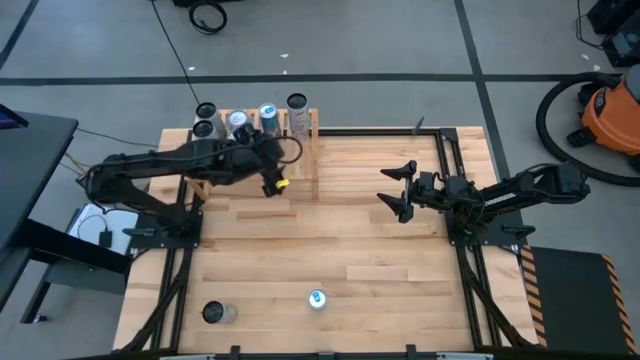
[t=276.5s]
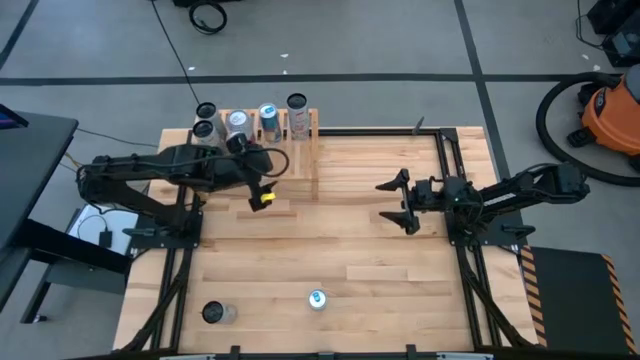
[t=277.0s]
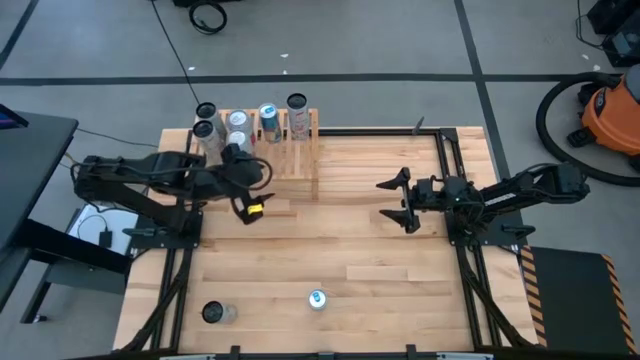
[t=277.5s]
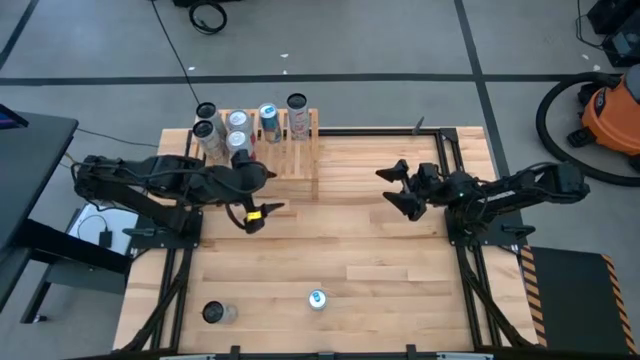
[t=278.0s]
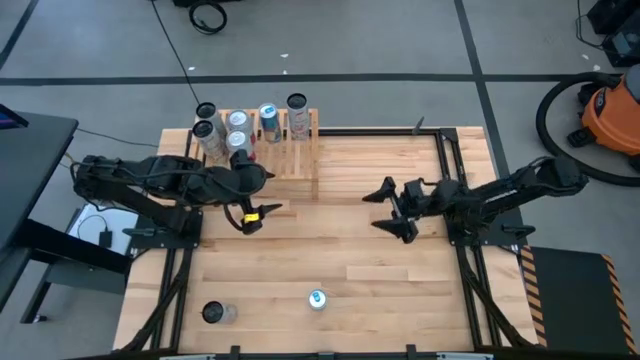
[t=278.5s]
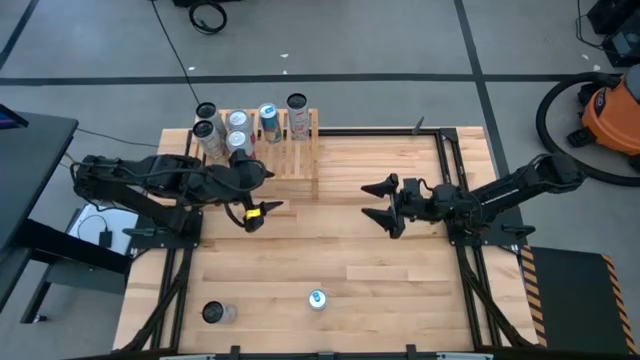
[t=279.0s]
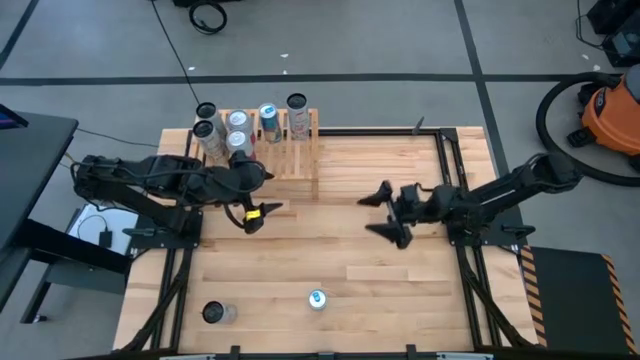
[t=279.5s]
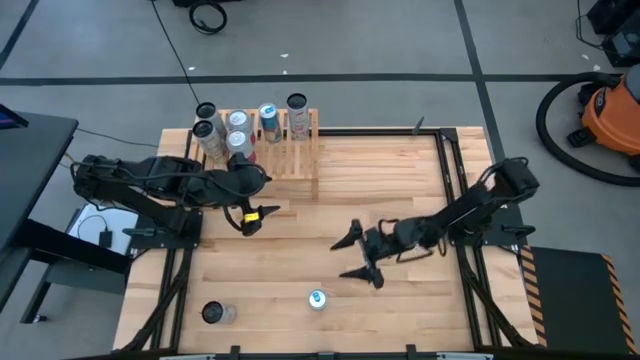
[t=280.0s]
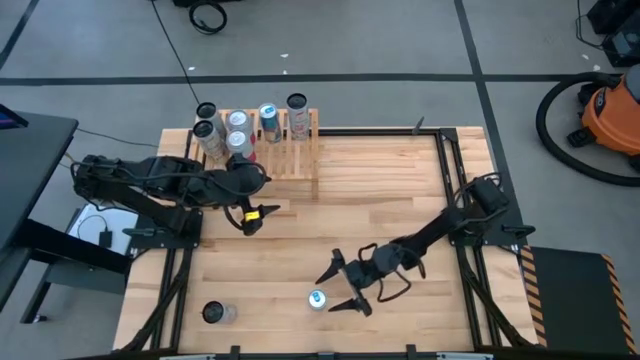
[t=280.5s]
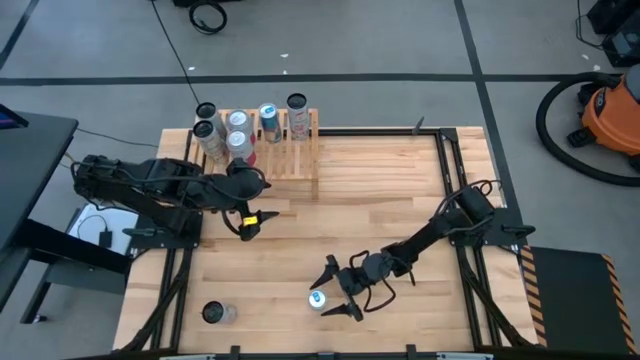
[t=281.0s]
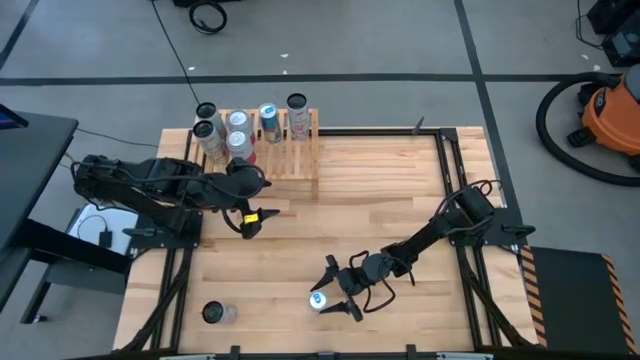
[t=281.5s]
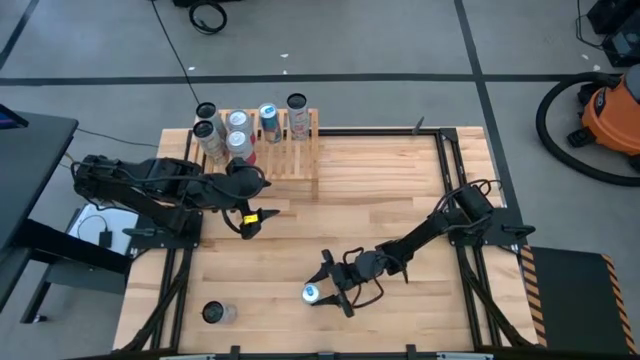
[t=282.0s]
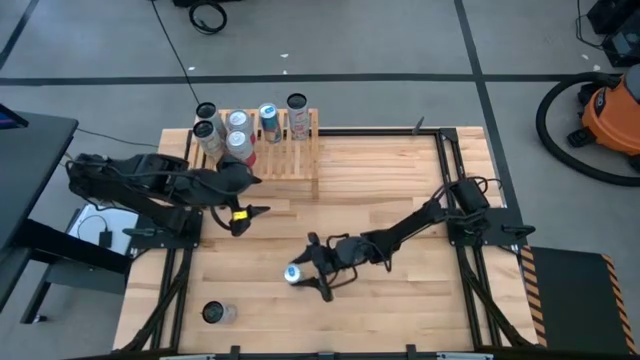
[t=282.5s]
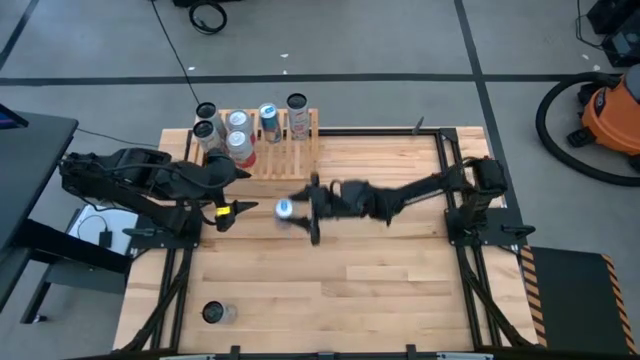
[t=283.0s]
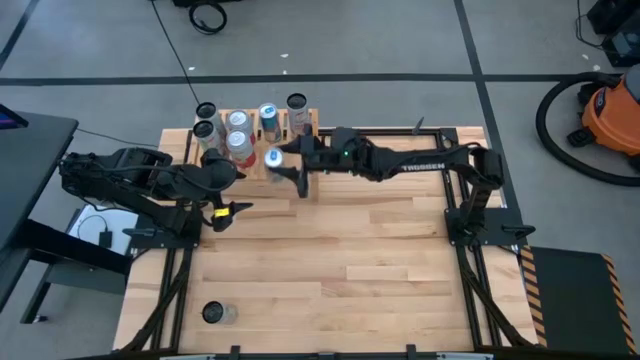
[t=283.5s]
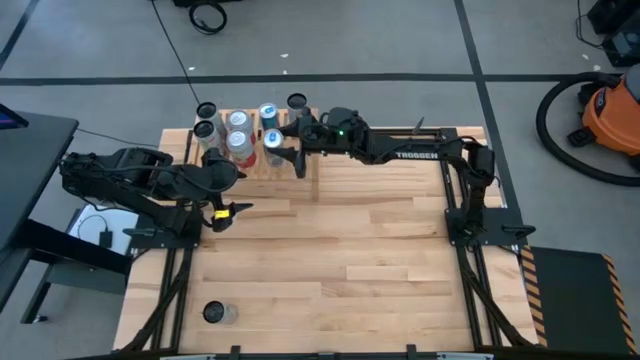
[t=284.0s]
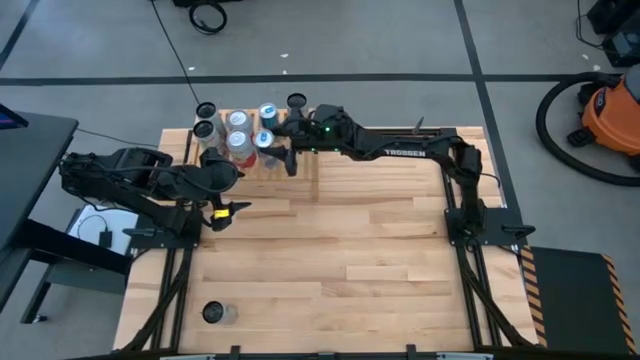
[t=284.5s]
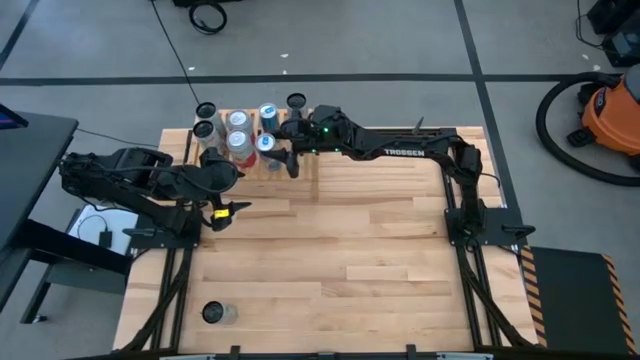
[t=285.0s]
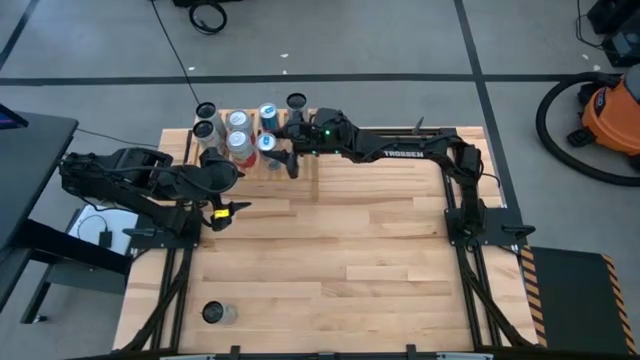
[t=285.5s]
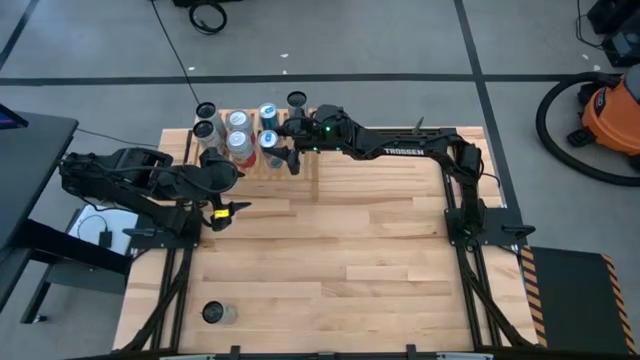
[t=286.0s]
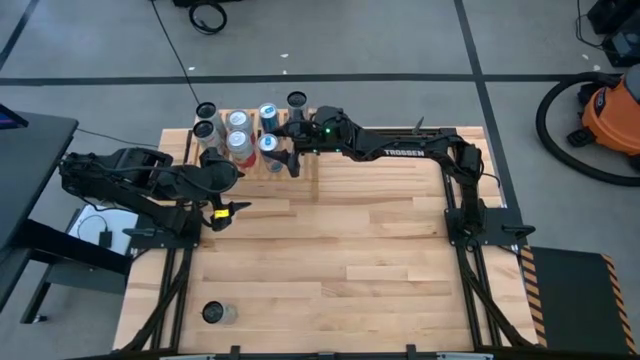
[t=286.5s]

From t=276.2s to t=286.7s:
Task: Place canned beverage on shelf
Put the blue soda can on the shelf aligned with the other blue soda can

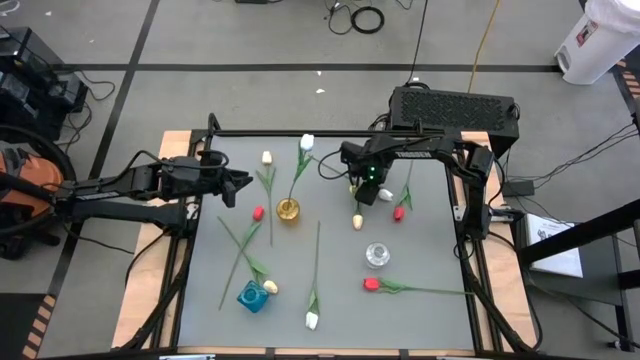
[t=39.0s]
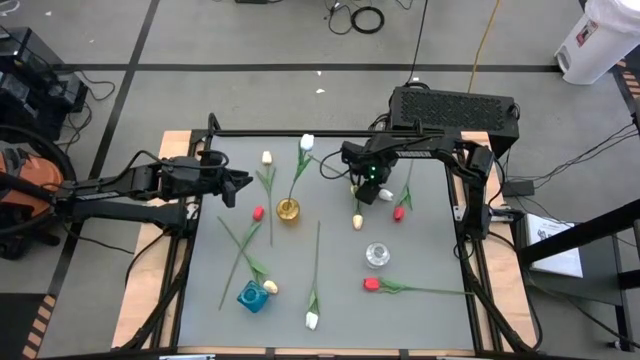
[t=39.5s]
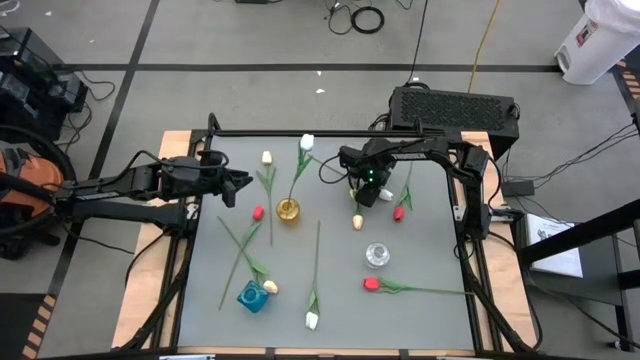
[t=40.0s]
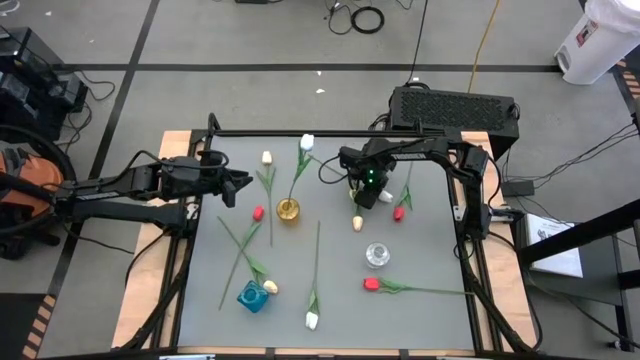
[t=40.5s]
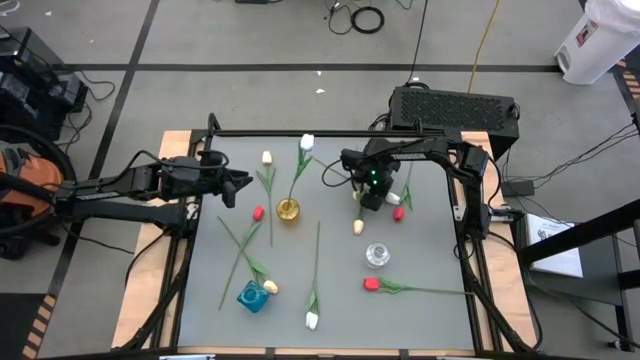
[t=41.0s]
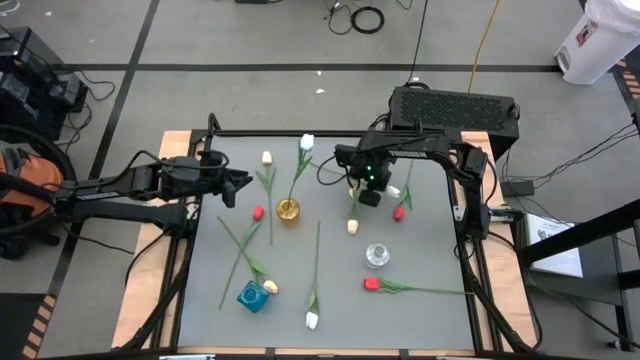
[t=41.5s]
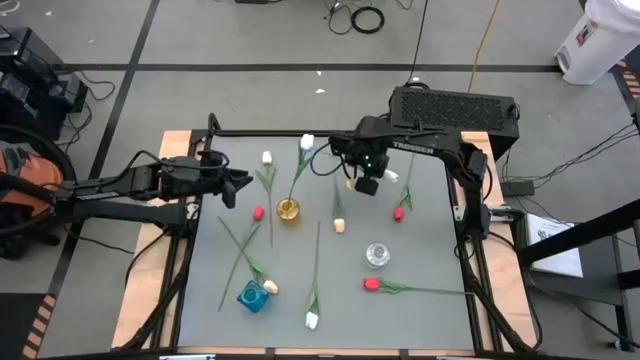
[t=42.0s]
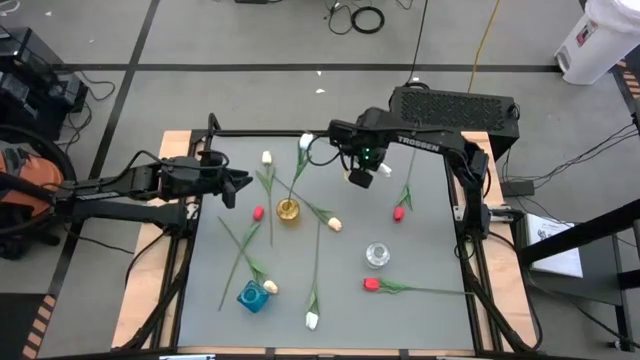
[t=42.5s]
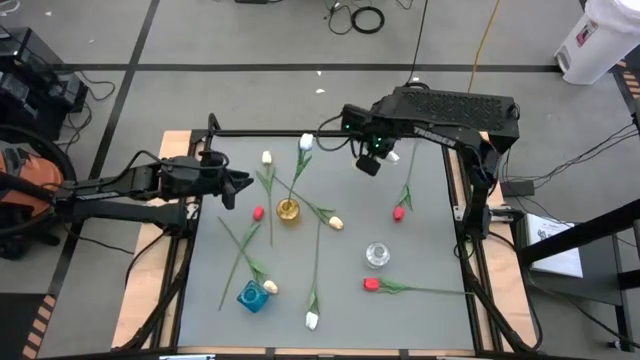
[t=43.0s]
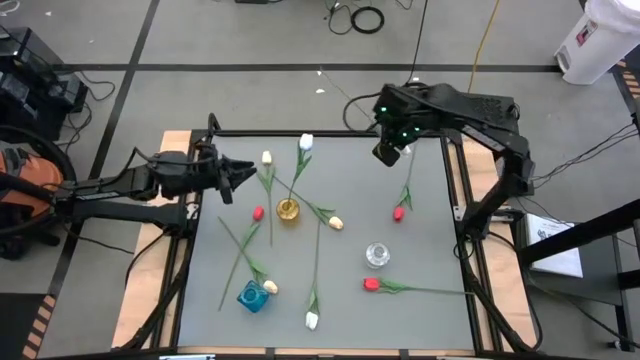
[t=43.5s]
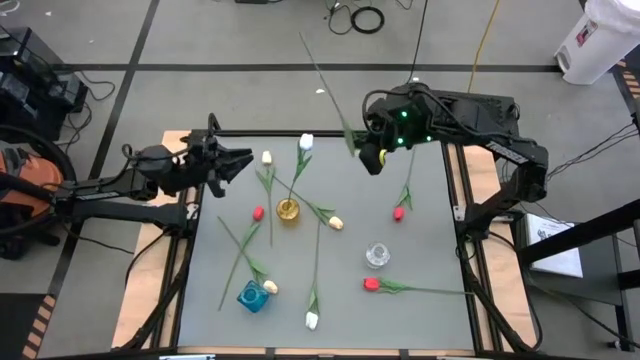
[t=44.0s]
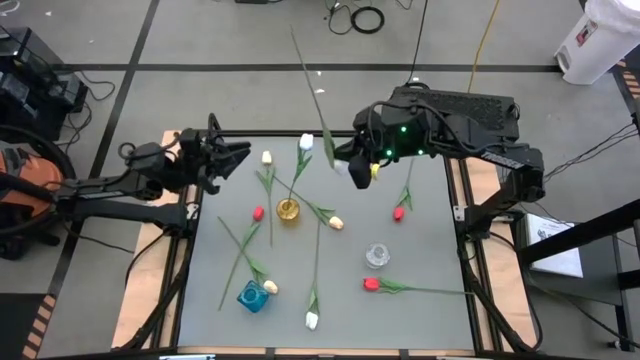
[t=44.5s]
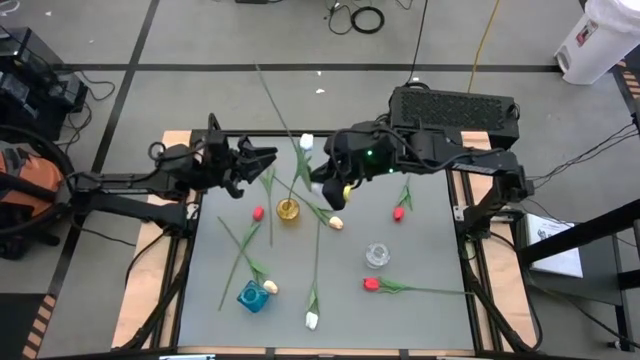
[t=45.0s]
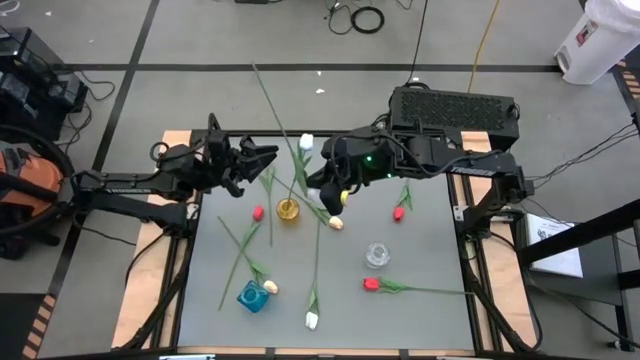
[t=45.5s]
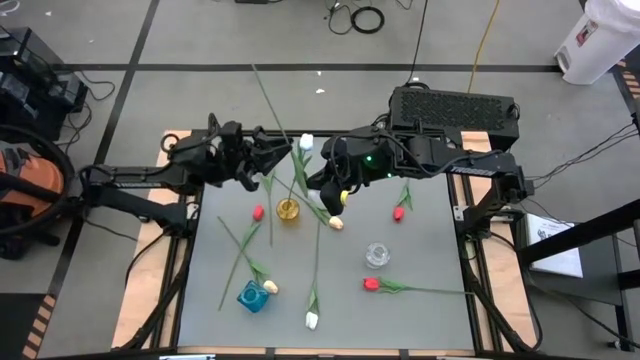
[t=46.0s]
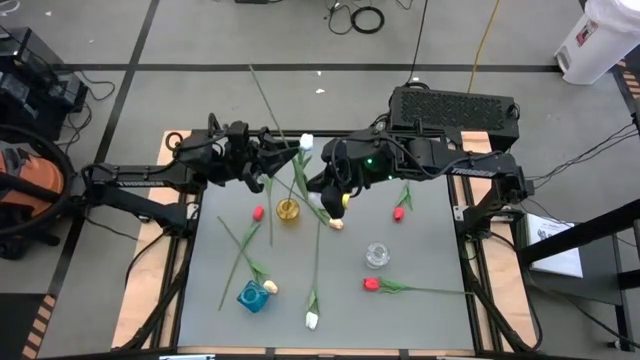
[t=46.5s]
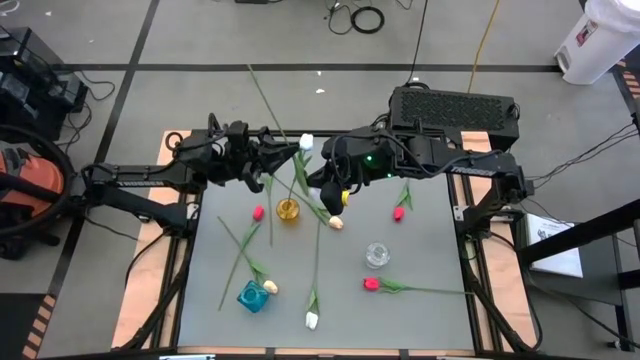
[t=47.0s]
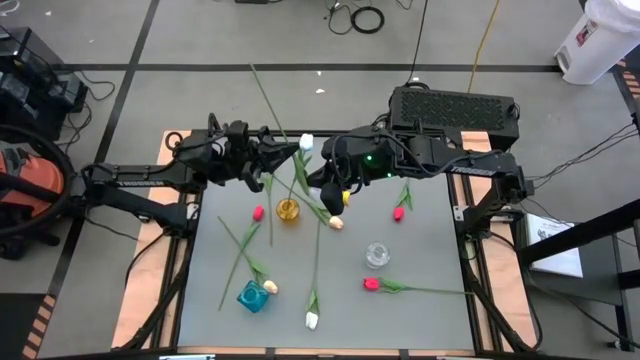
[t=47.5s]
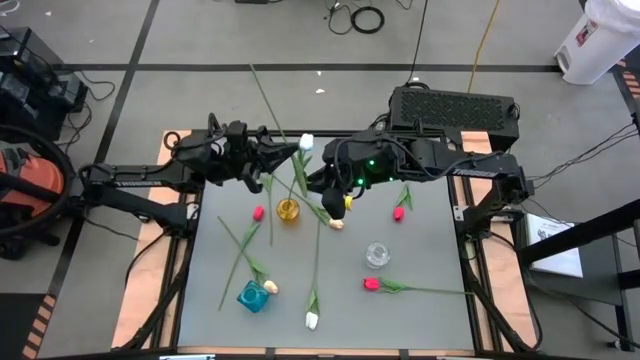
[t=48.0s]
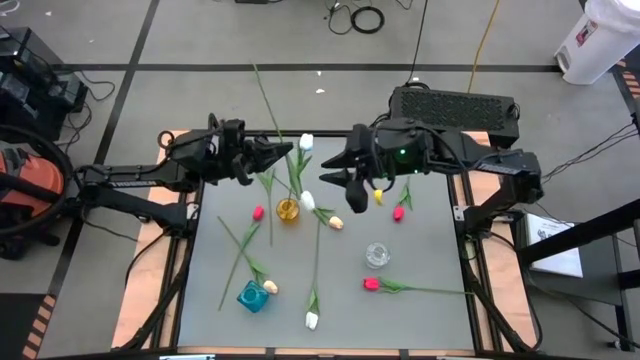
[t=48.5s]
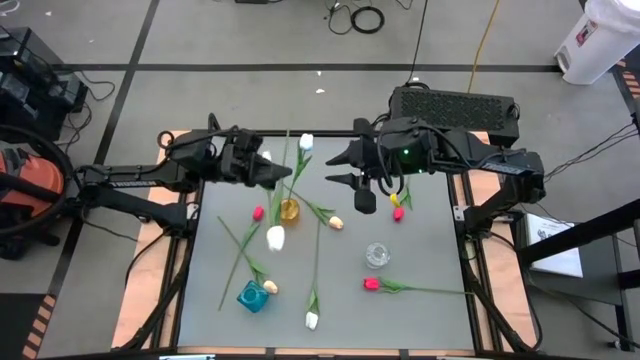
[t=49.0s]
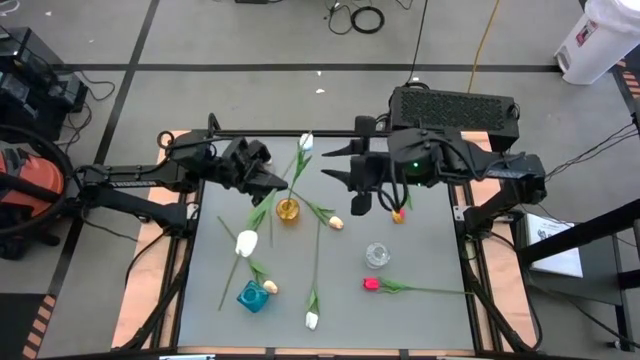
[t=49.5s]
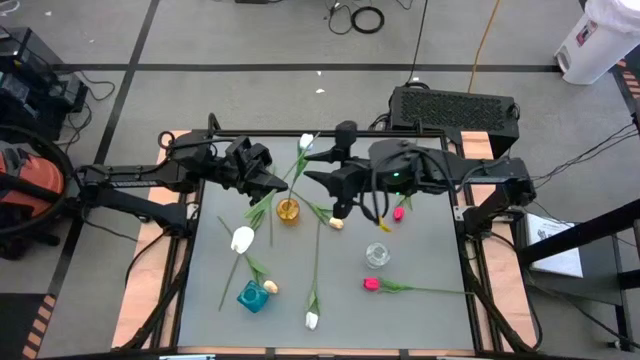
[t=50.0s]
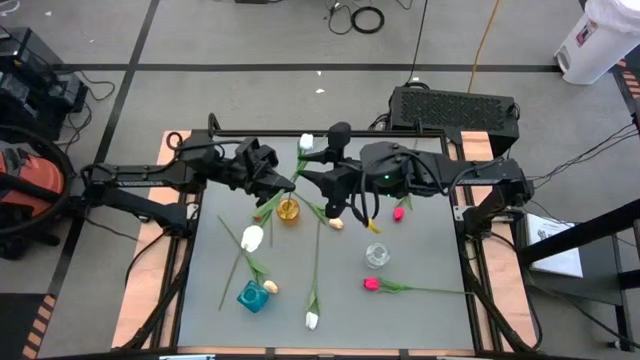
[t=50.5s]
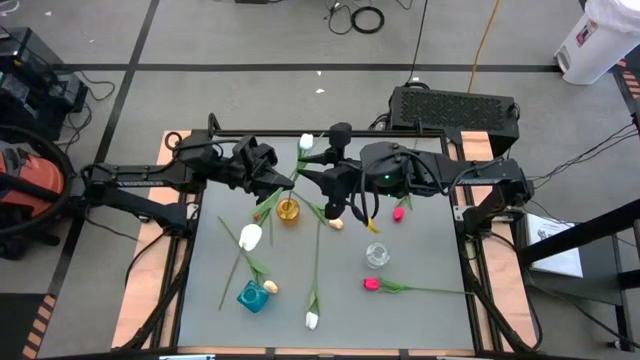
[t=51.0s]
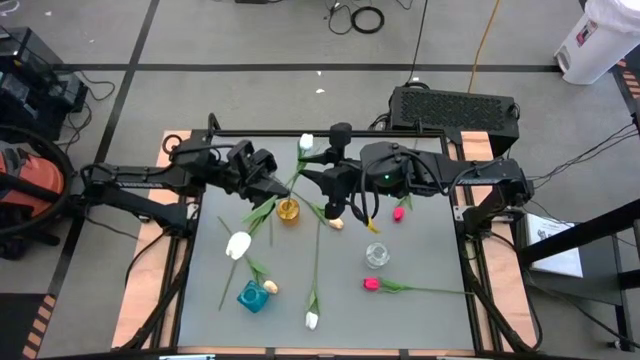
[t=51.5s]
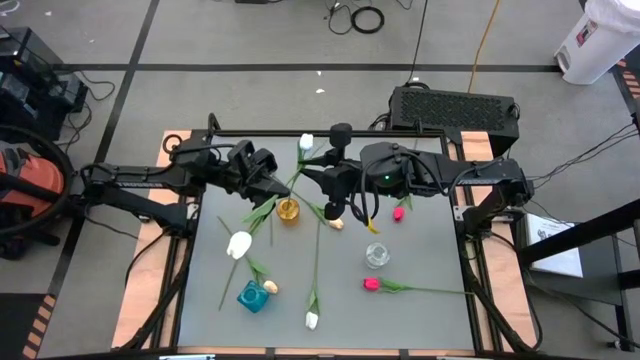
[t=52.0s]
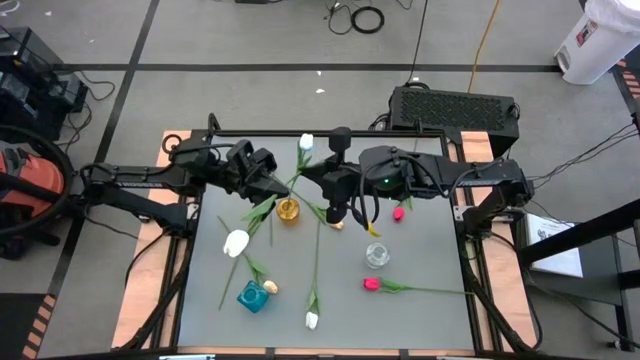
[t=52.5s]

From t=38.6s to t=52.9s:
Task: Sort flowers into vase by color
Put the top white tulip into the yellow vase
